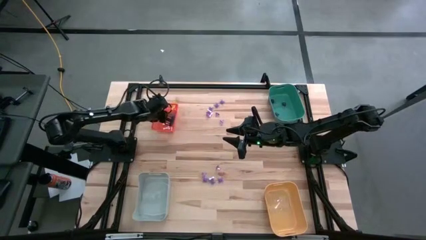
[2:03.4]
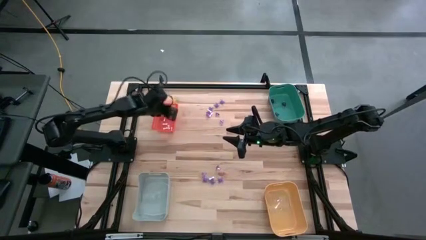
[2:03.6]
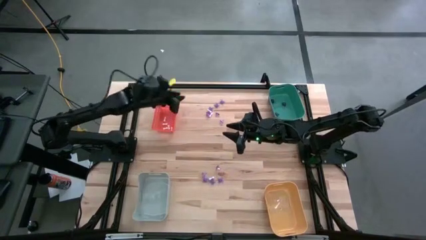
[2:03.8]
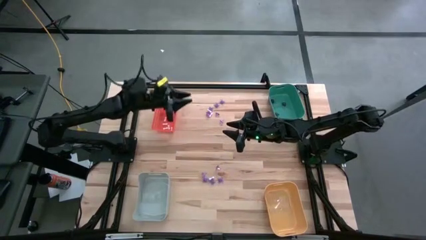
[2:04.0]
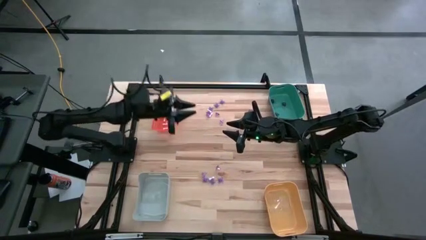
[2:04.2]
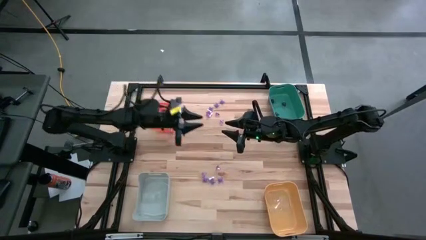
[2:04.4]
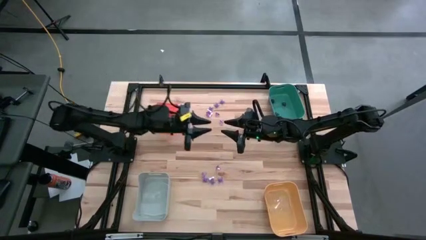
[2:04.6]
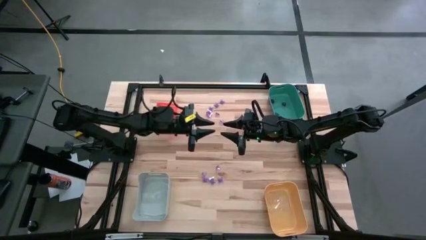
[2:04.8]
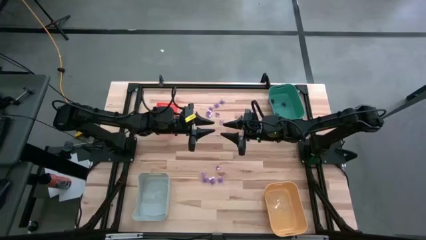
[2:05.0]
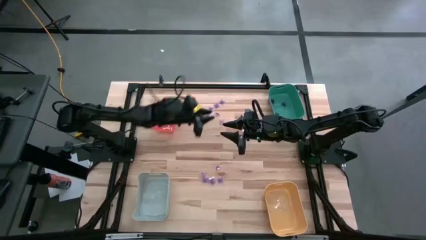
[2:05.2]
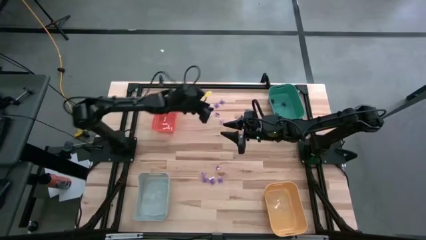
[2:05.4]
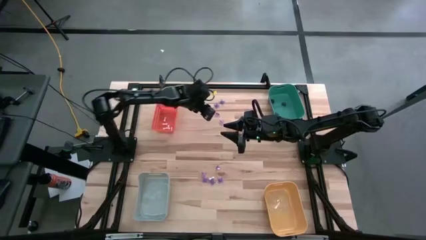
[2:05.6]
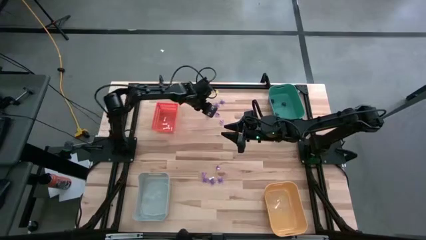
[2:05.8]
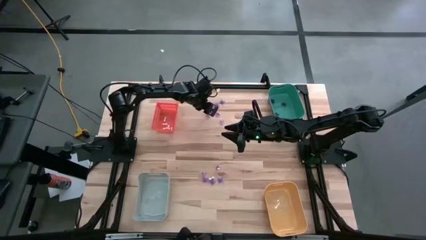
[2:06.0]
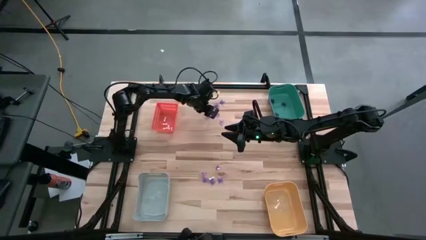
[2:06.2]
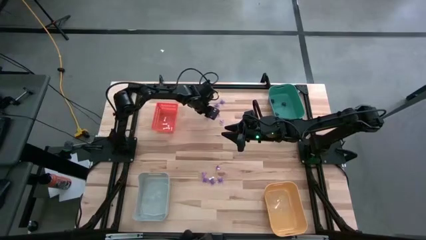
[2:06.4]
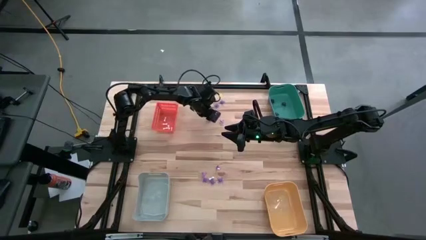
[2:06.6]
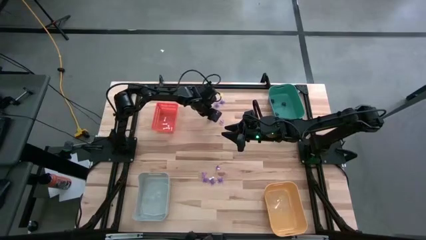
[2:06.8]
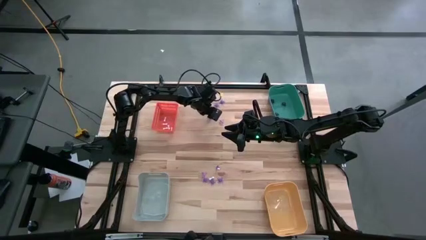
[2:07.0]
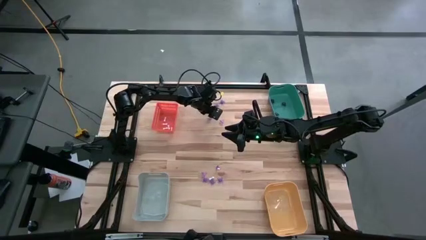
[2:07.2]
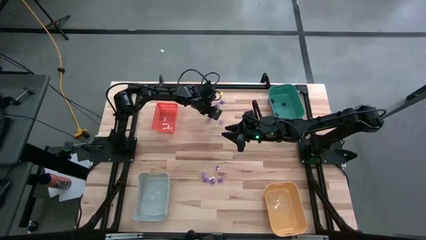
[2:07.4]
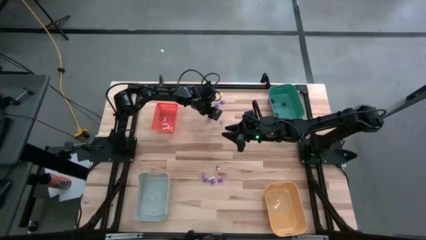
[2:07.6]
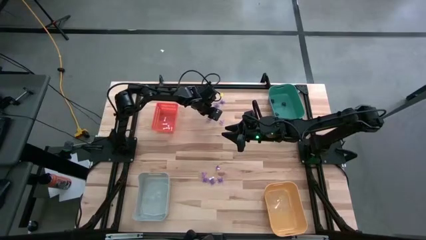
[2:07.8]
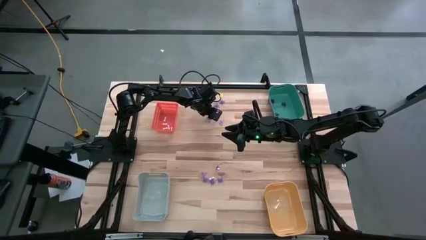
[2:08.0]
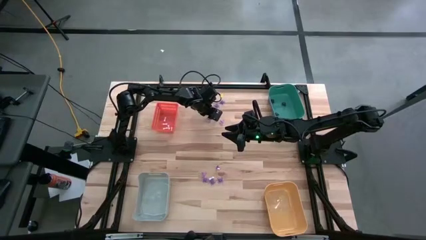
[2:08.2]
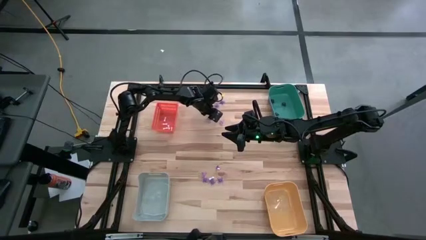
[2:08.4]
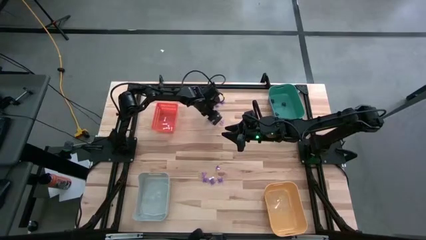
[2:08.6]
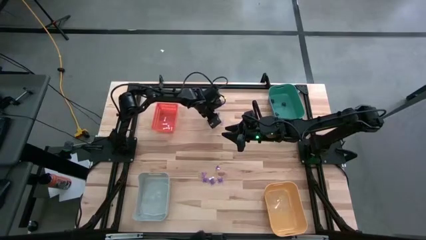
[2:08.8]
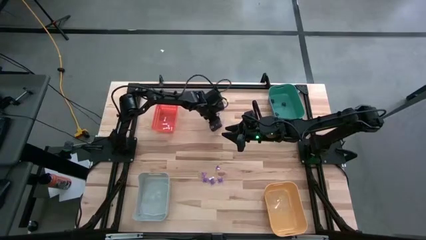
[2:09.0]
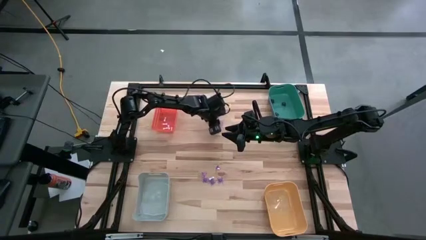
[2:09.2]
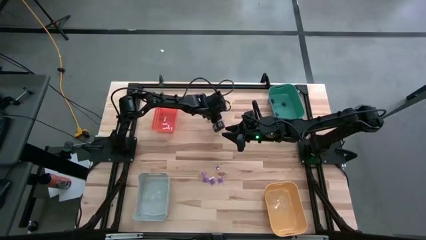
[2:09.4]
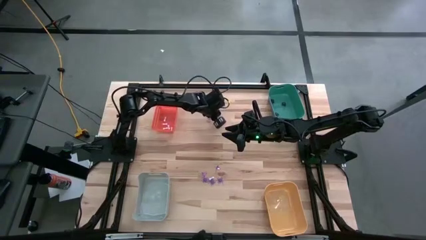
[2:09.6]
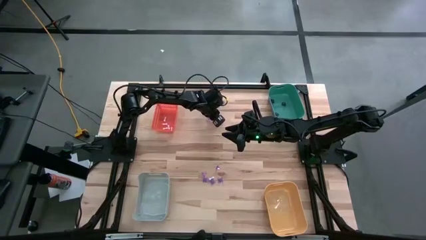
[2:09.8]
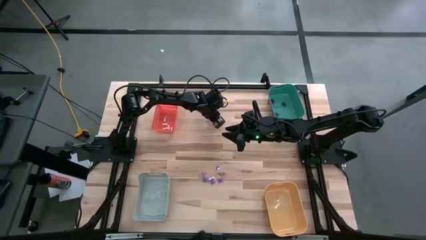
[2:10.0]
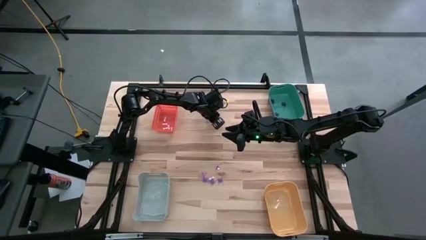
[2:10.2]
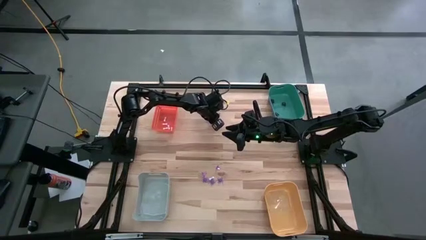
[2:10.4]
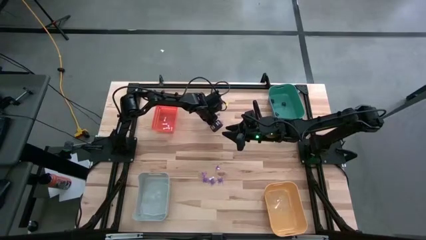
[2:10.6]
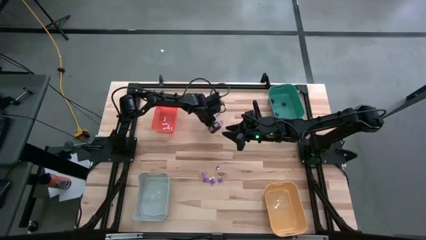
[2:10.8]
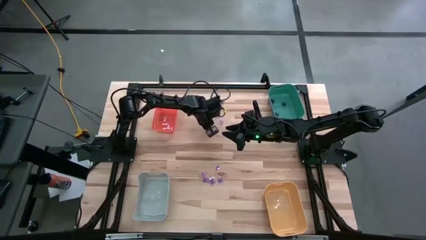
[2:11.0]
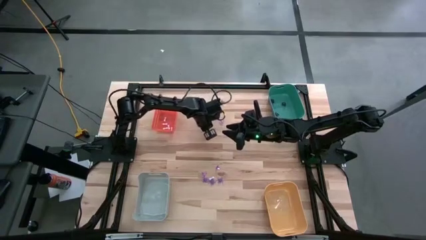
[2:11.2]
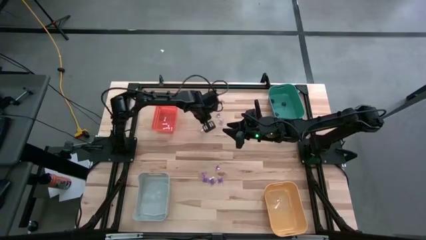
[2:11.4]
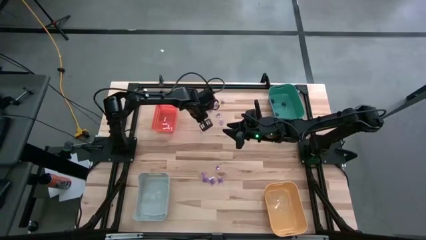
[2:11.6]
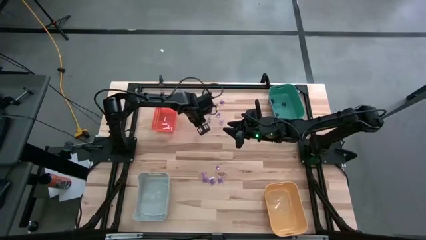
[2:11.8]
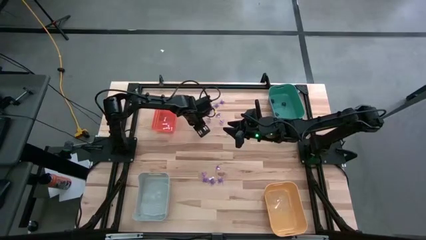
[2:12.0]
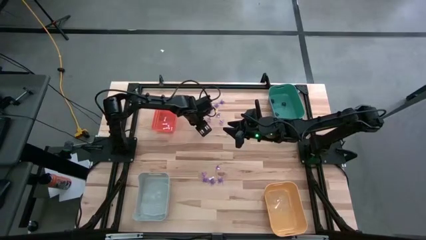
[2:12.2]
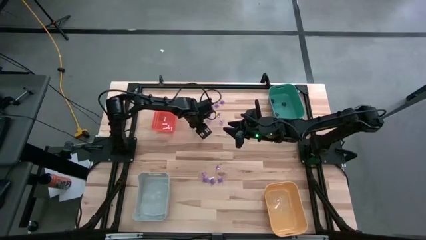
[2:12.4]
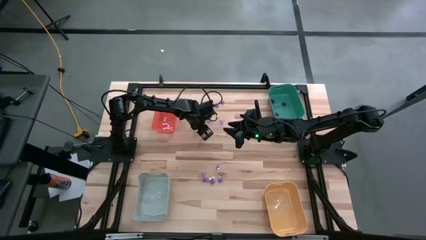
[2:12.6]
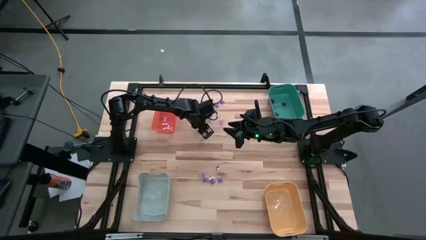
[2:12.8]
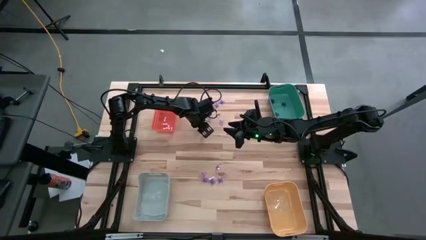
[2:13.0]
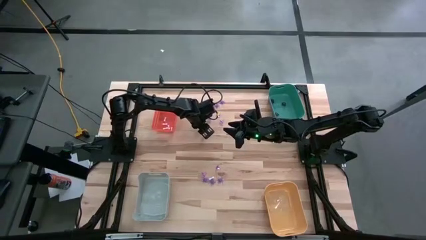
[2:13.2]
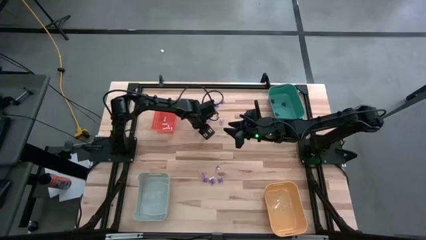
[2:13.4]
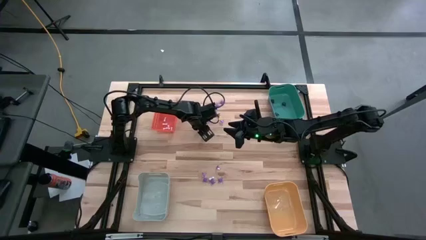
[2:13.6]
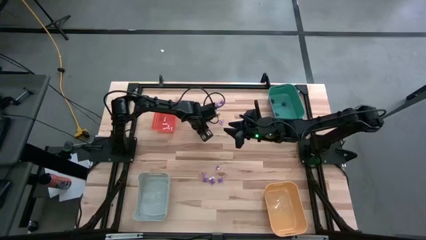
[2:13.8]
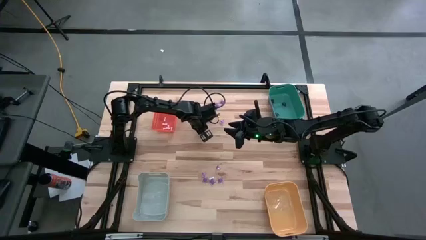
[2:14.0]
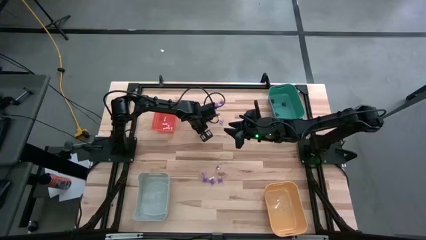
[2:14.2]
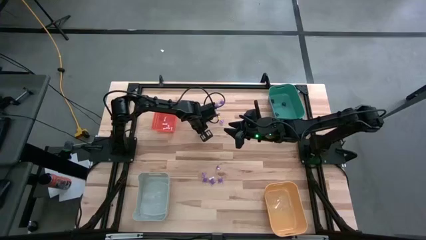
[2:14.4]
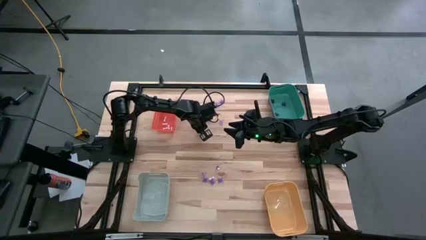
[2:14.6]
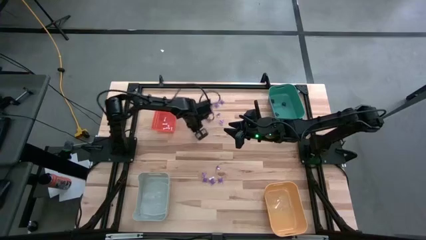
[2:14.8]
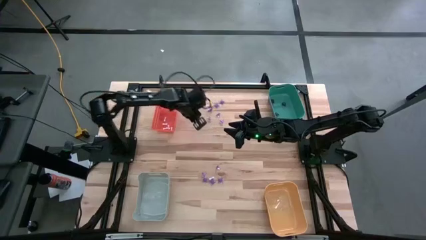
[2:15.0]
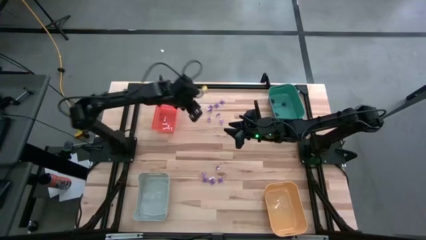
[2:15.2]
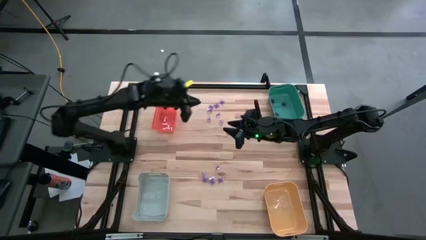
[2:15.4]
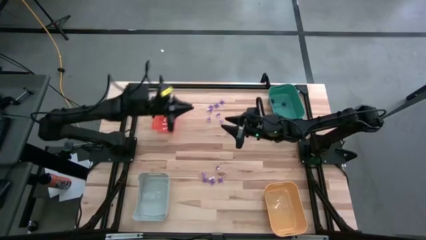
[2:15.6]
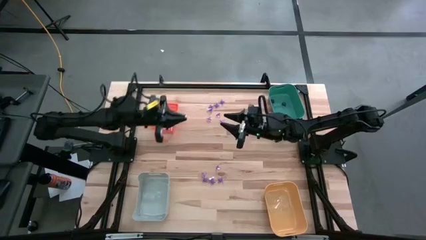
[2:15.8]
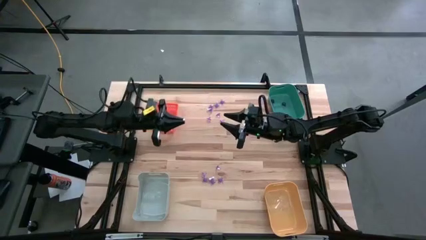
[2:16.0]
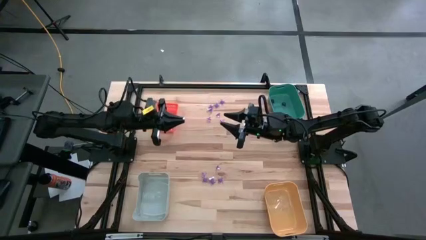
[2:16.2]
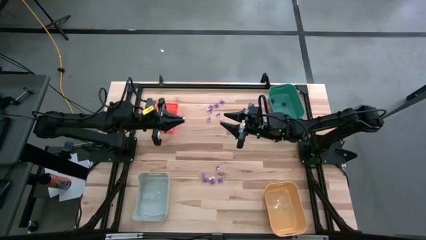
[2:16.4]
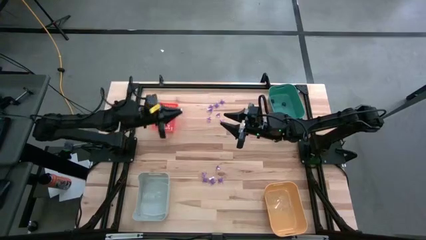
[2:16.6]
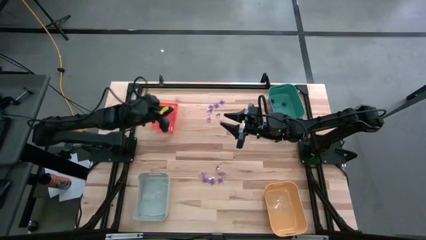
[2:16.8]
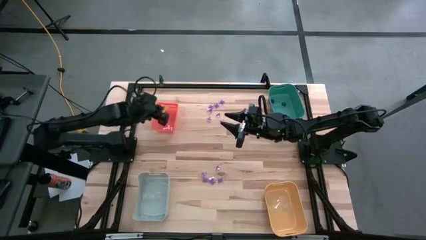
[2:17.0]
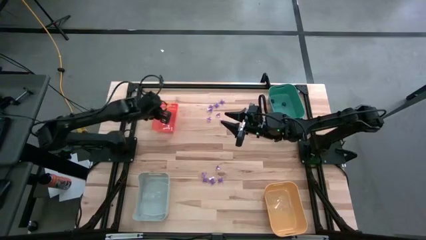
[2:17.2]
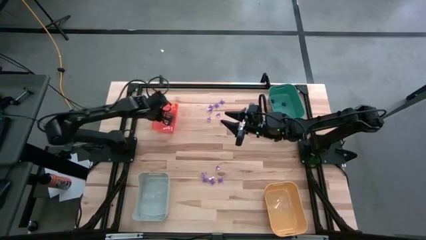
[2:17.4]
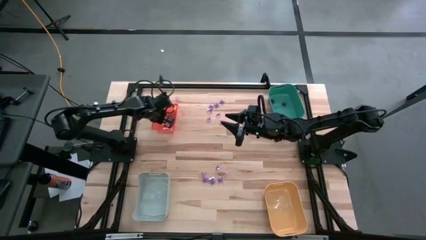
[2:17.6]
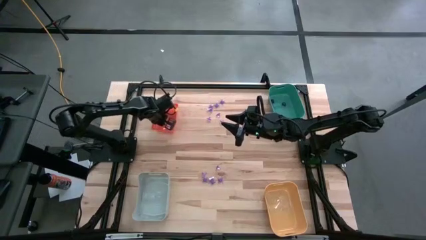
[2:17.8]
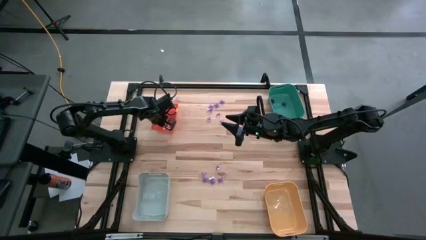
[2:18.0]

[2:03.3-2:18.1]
Task: Sort Halloween decoration
Put the white bone toy into the orange bin

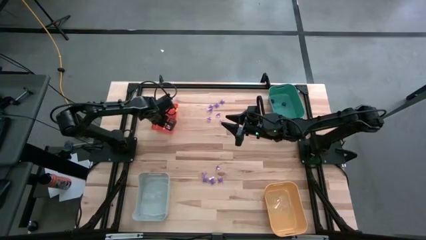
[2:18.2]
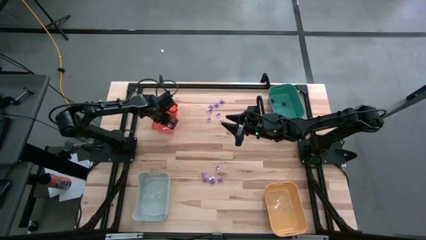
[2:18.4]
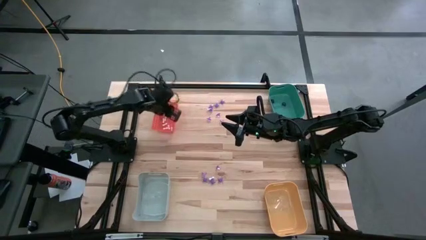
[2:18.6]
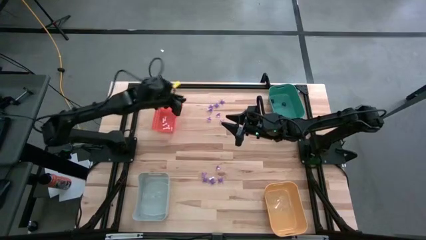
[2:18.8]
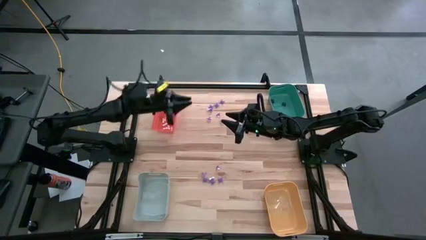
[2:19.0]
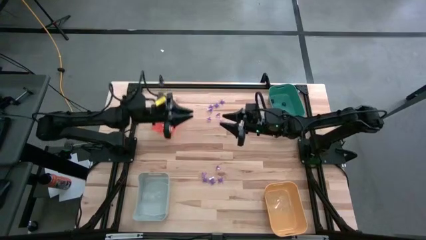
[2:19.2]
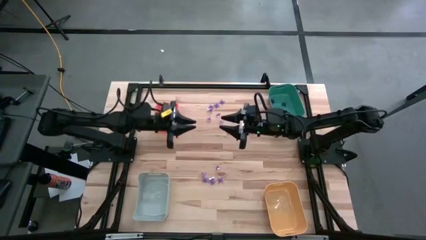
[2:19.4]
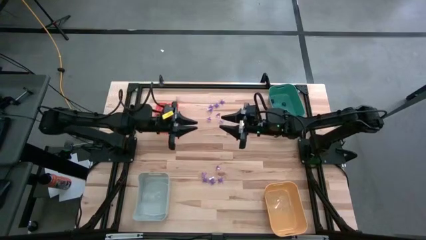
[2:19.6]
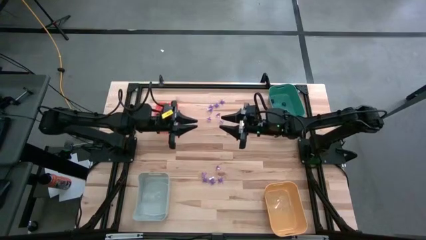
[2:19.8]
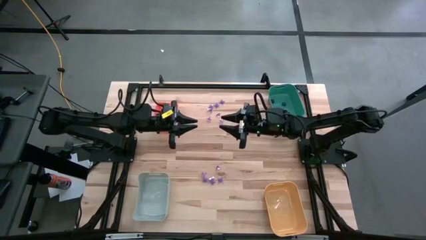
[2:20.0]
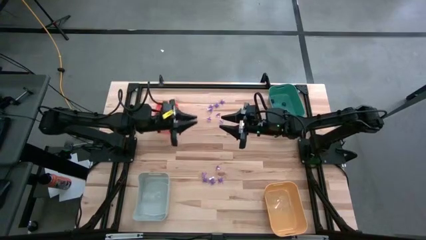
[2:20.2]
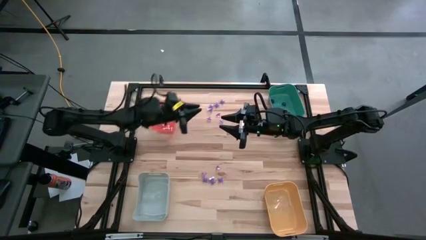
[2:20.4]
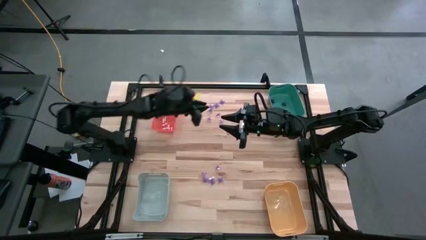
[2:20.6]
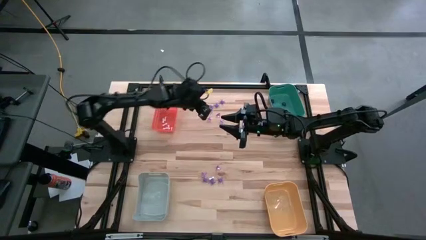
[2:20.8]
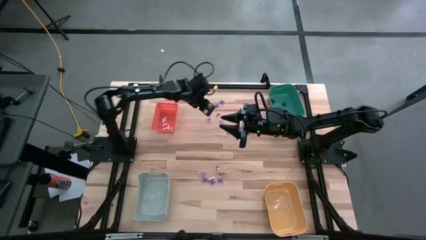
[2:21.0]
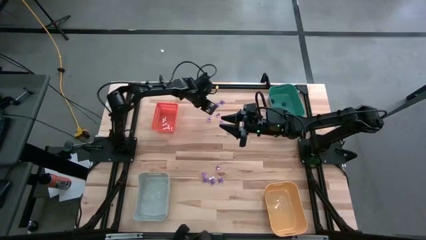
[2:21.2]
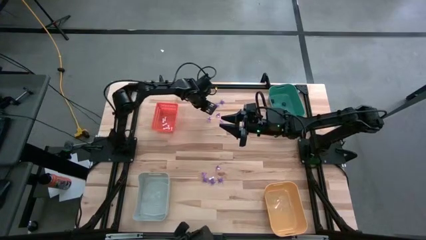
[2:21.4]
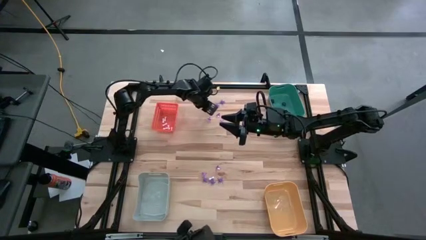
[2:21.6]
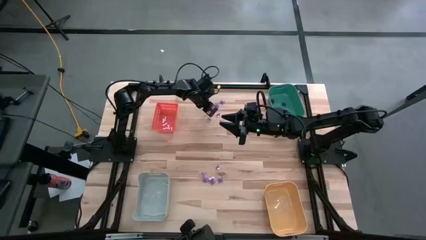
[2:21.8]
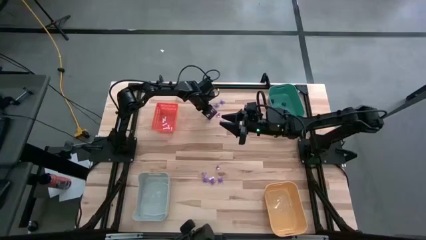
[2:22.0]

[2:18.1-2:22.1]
Put the white bone toy into the orange bin
